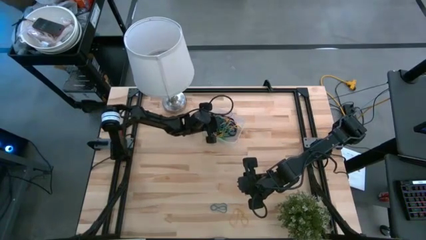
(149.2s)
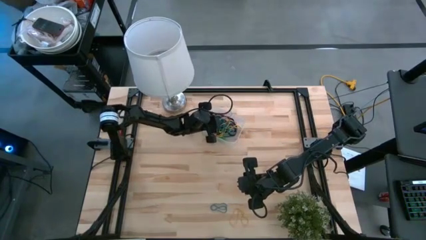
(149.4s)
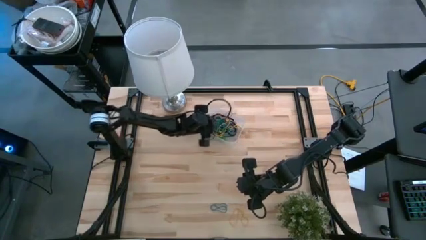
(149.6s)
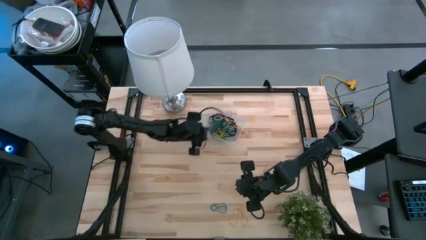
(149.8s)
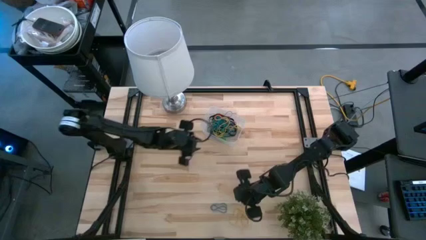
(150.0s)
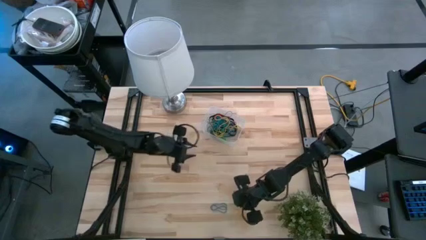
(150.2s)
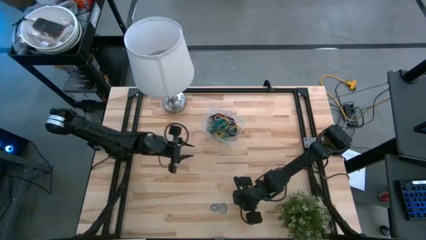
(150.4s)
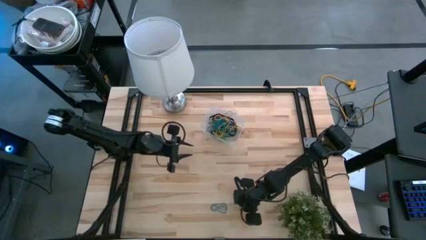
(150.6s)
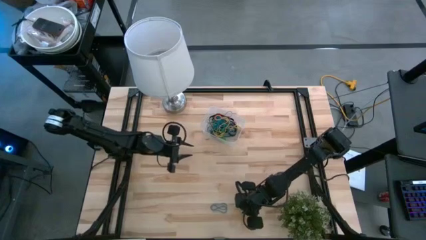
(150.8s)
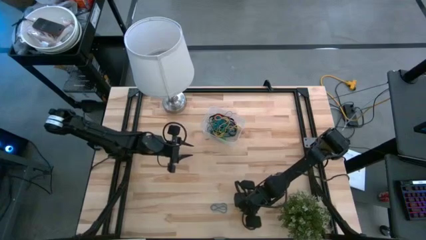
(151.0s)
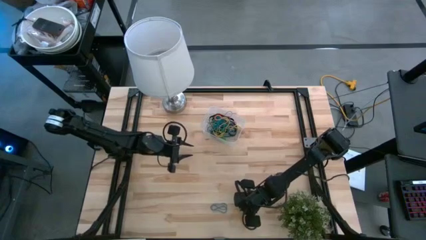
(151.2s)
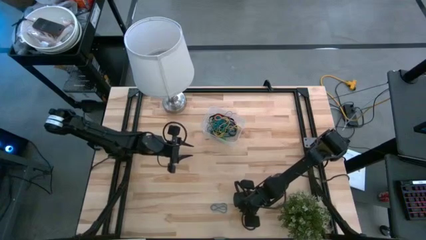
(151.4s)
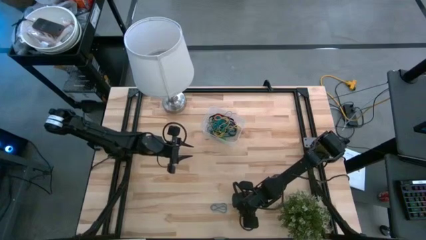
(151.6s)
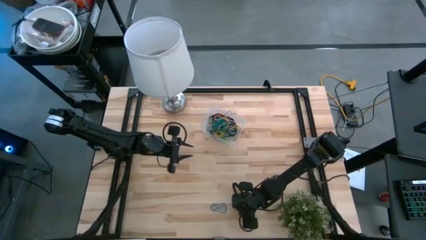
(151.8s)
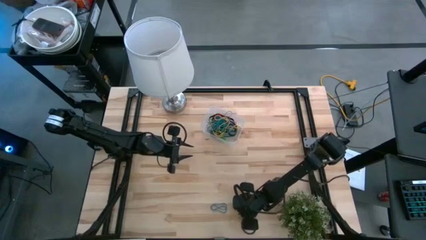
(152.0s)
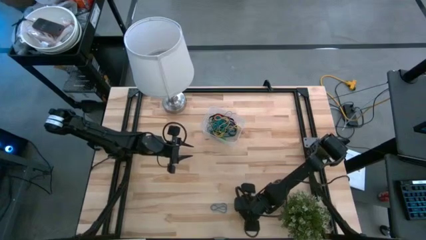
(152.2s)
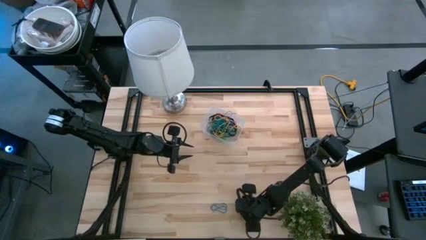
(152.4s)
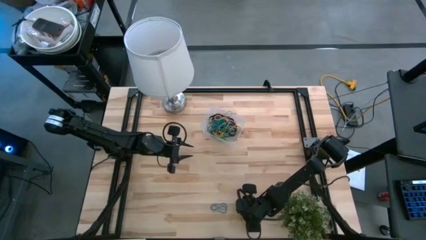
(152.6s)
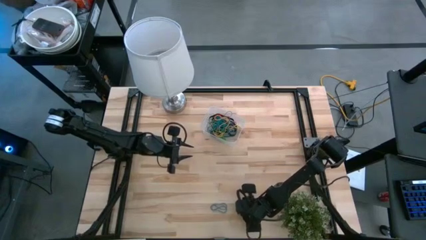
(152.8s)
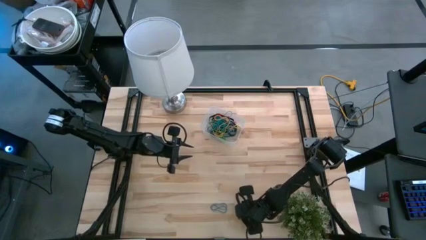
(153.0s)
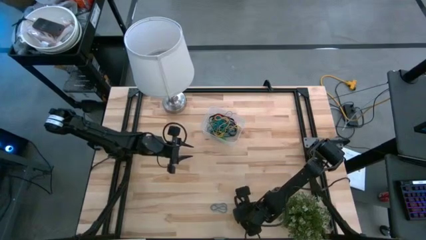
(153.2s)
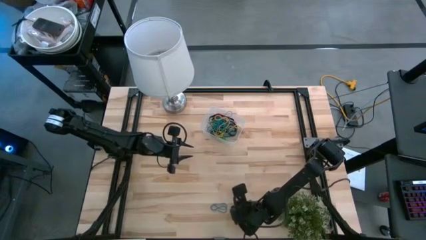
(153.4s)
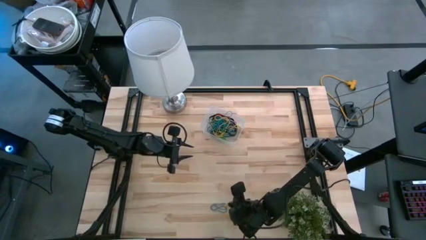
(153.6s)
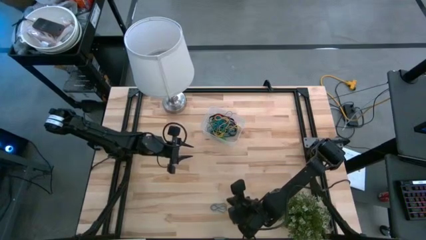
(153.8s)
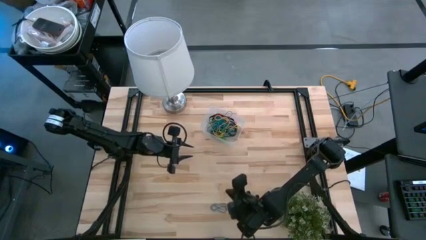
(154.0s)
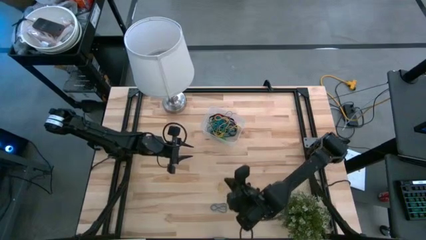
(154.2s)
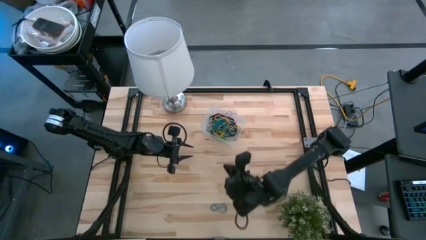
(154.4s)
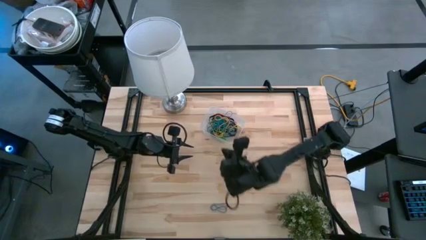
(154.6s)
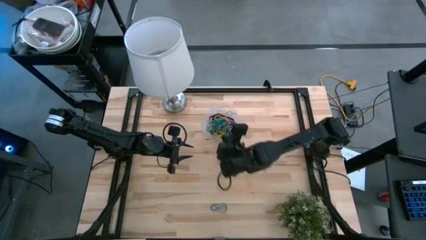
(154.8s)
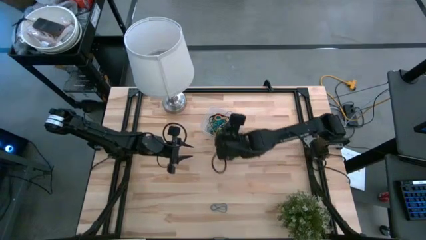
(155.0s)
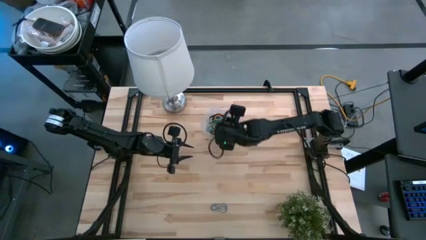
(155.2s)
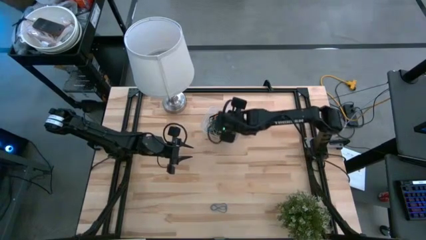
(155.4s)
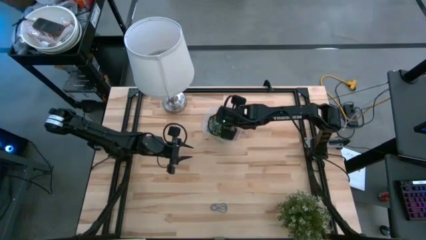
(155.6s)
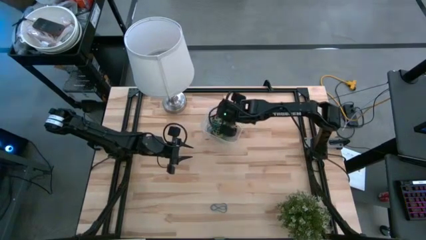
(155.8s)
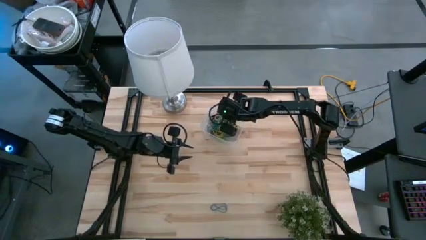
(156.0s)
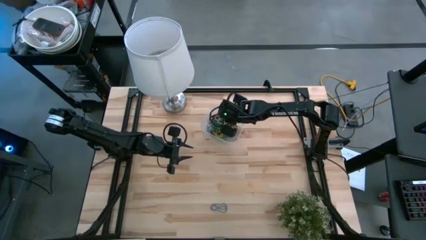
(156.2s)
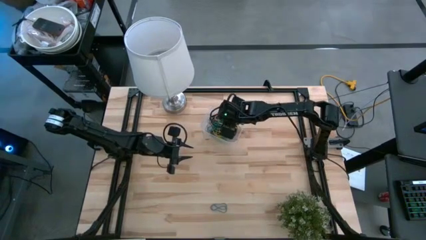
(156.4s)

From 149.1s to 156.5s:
Task: Pick and place rubber bands into bin
Put the yellow rubber bands into the bin

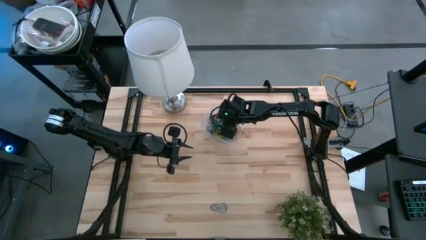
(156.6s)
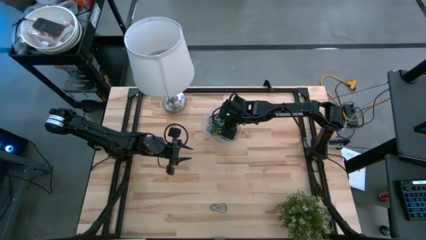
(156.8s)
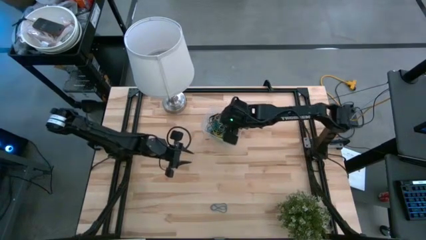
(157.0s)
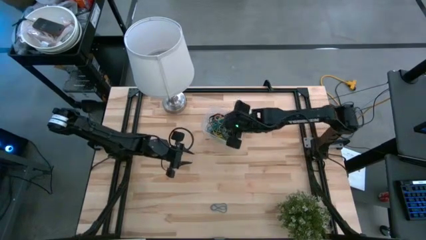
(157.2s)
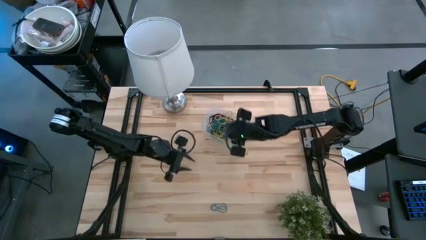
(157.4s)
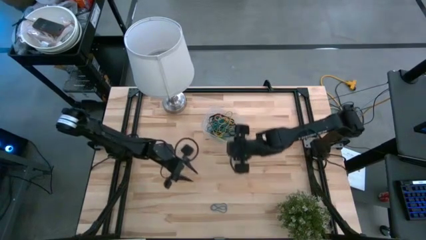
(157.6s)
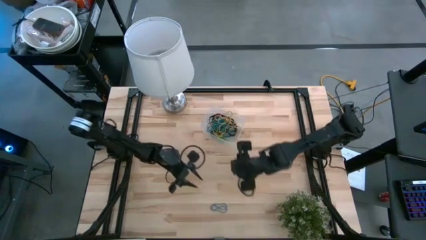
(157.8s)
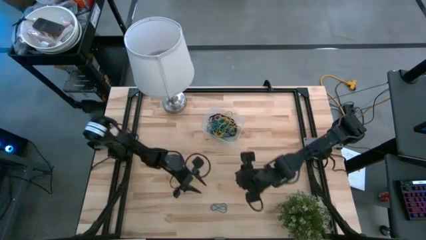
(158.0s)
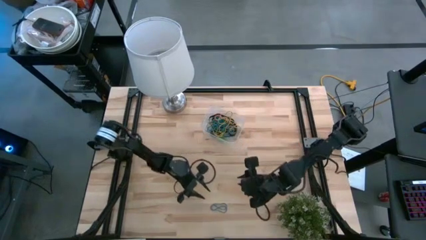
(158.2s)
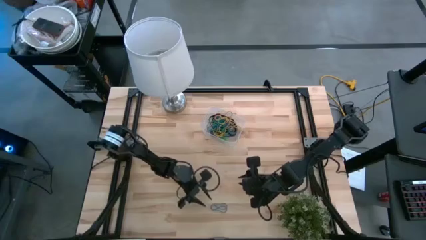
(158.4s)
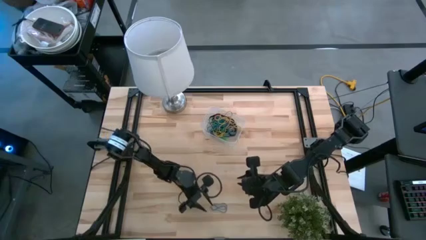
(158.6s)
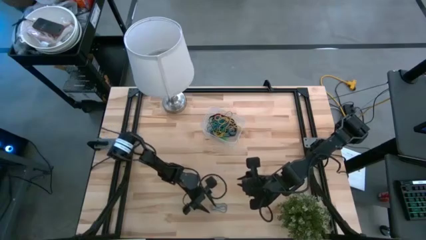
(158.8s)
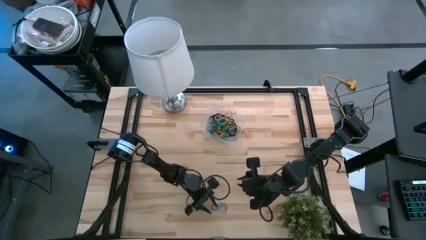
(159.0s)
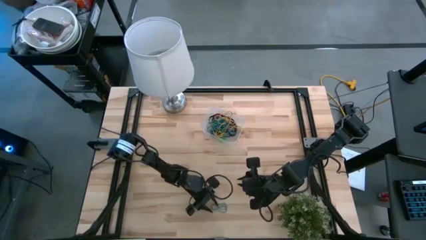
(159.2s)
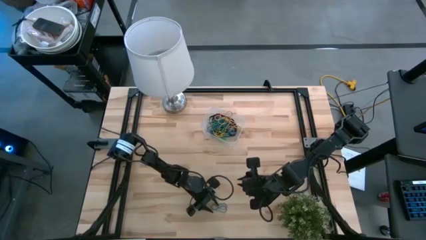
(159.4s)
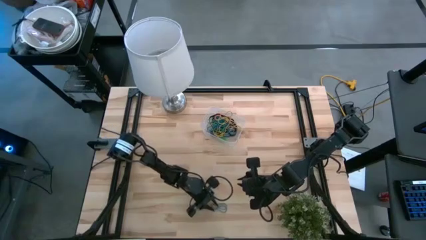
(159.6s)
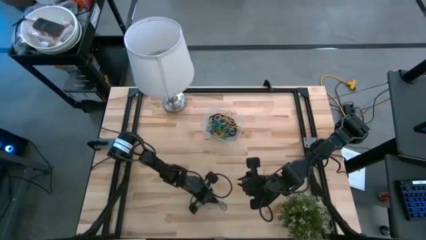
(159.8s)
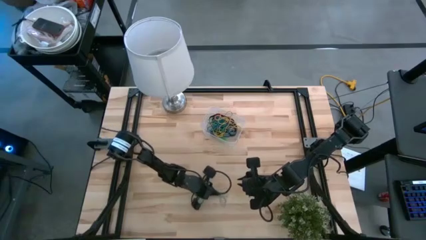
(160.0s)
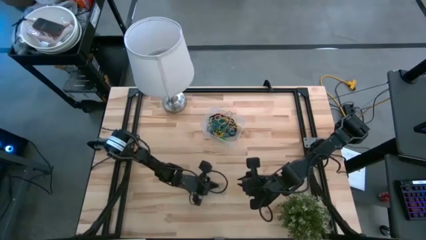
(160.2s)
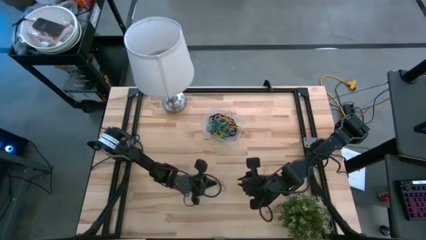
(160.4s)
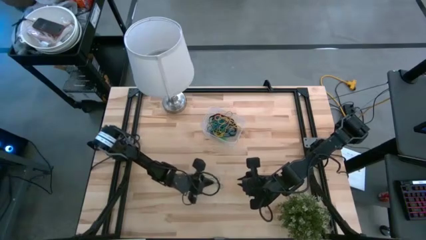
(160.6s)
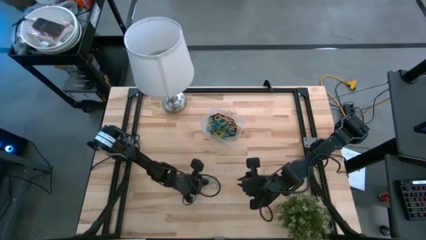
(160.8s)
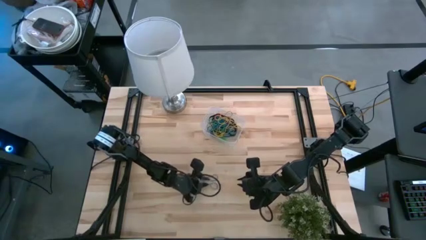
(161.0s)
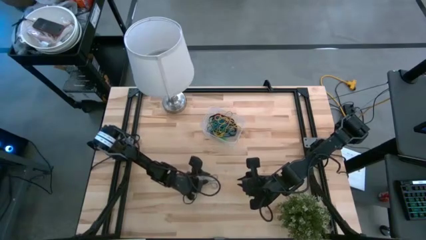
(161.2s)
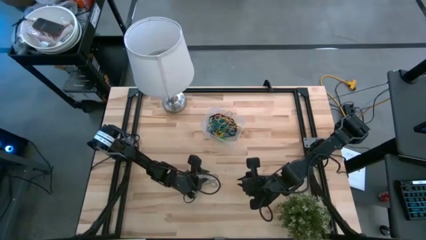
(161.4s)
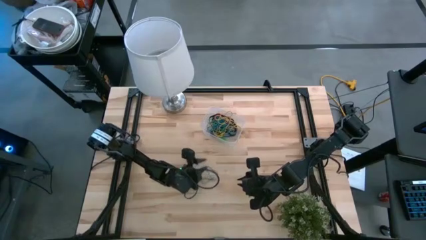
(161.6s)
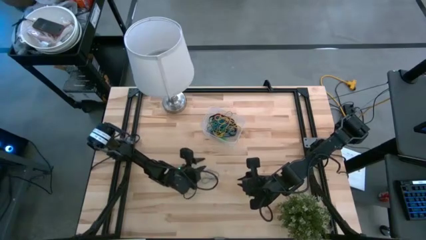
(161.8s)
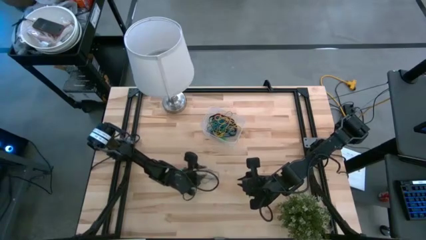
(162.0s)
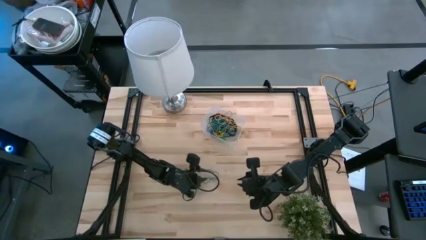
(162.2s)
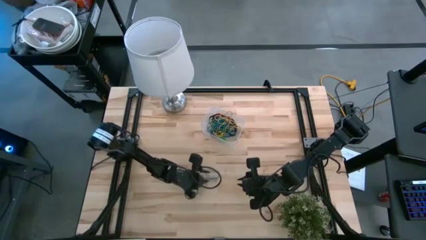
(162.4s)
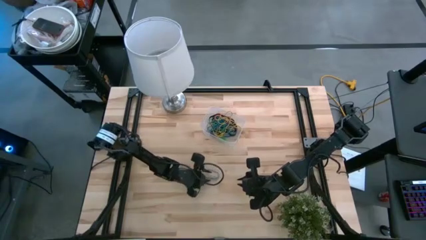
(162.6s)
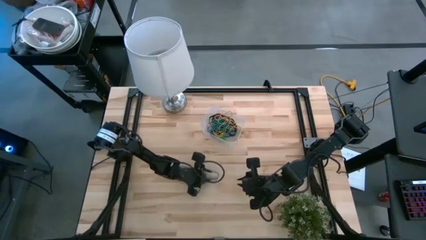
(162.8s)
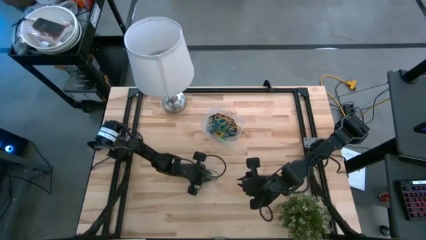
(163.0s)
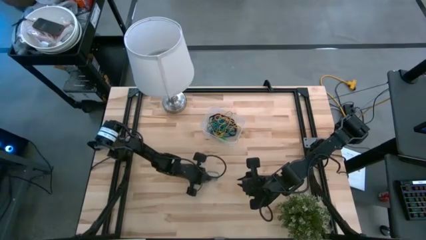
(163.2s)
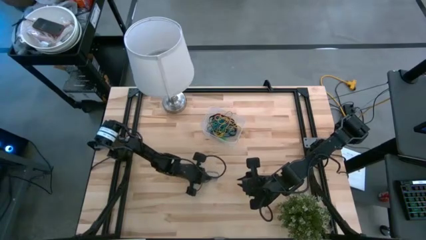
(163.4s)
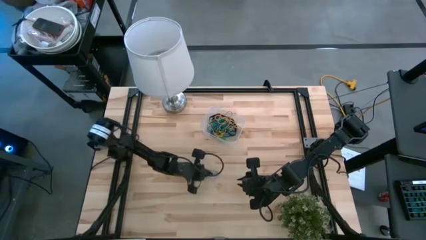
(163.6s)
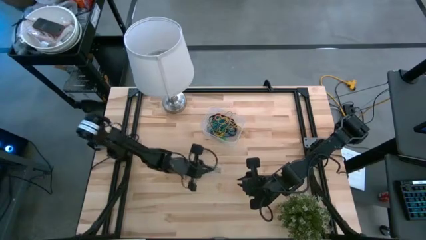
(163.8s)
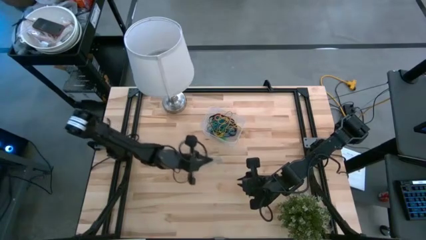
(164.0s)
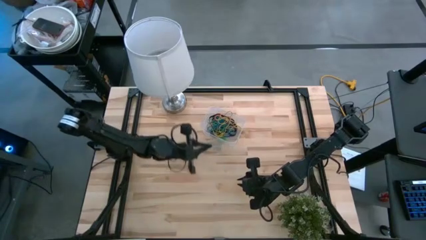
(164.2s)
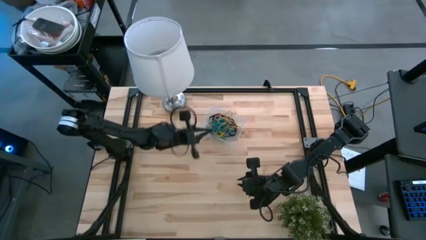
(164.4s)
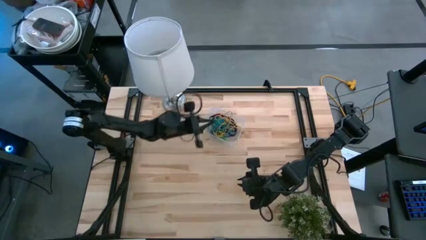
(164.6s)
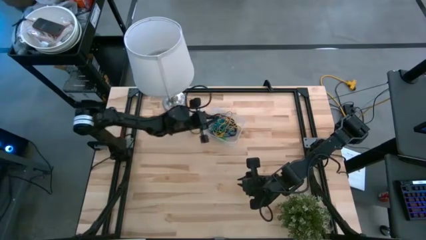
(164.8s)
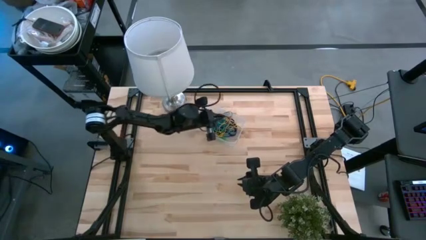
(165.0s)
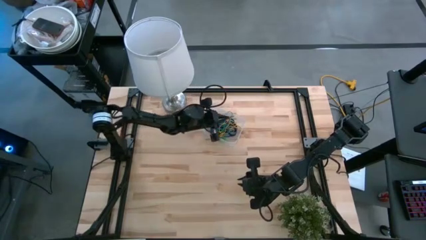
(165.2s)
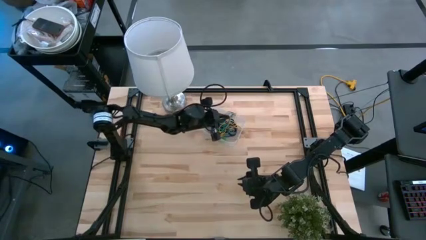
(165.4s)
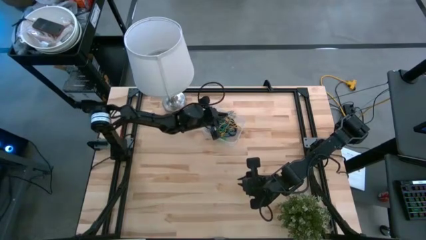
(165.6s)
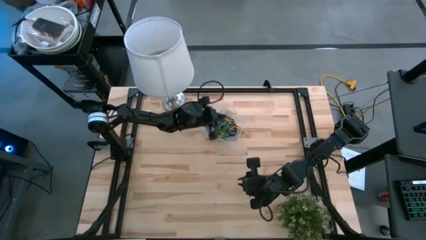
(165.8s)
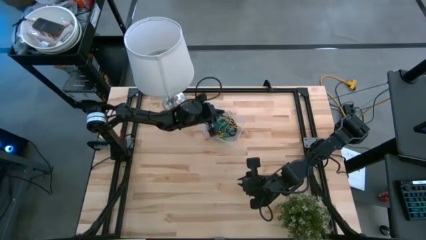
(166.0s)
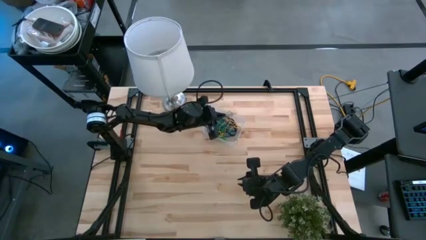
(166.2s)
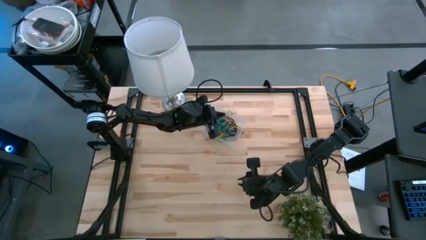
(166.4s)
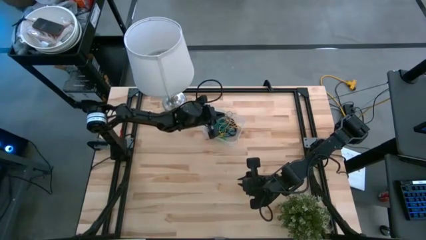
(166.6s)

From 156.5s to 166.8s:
Put the blue rubber bands into the bin
